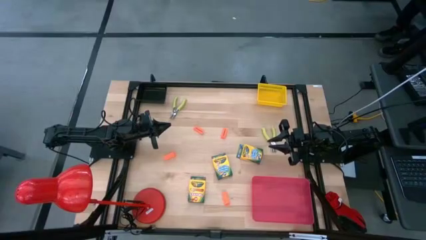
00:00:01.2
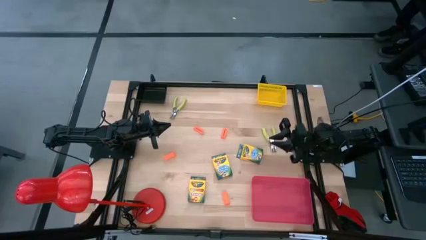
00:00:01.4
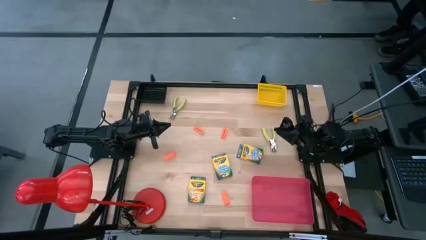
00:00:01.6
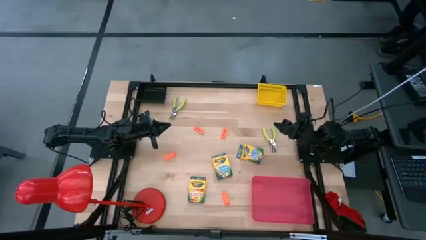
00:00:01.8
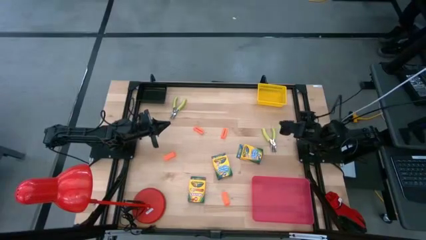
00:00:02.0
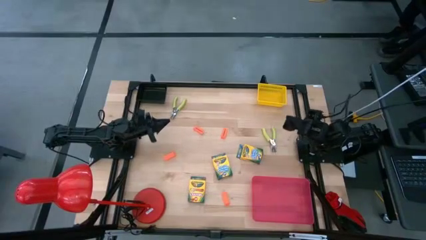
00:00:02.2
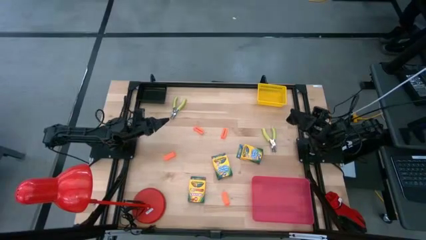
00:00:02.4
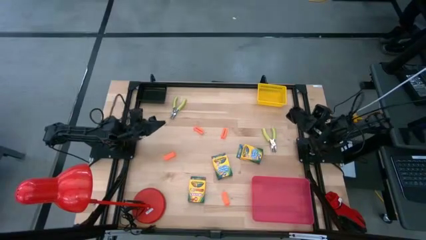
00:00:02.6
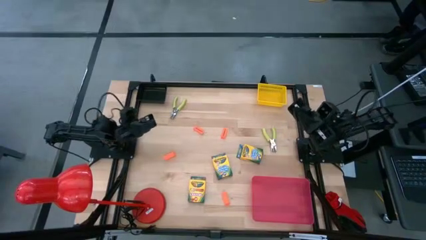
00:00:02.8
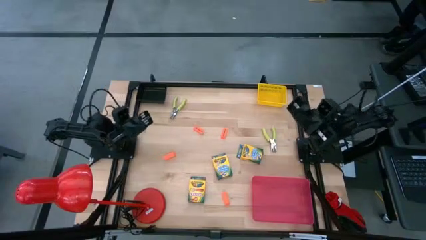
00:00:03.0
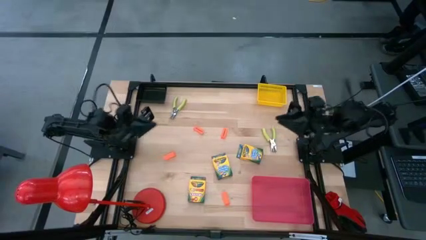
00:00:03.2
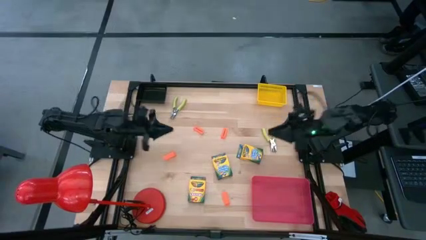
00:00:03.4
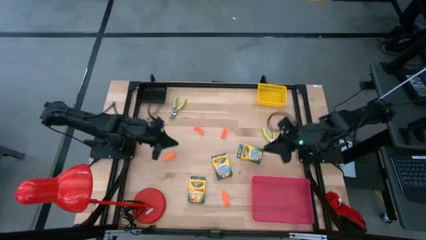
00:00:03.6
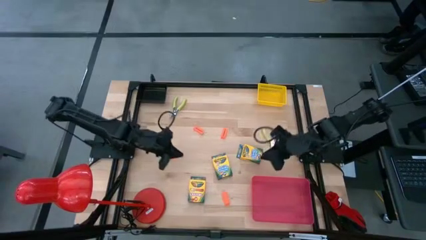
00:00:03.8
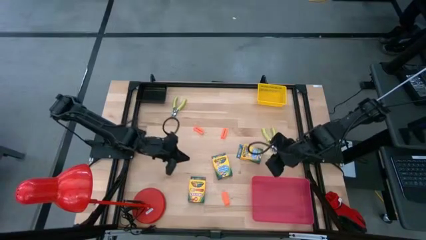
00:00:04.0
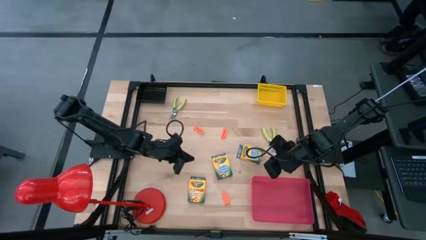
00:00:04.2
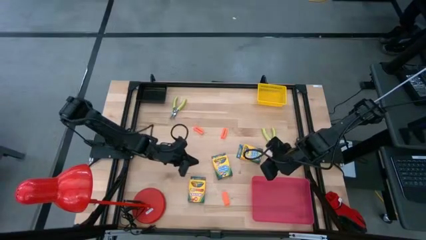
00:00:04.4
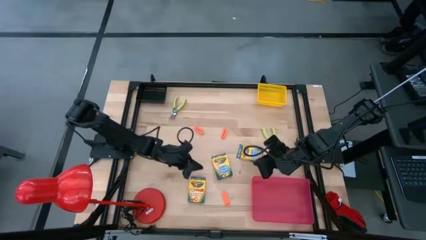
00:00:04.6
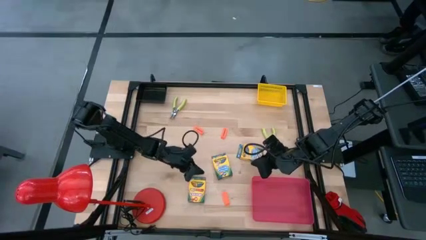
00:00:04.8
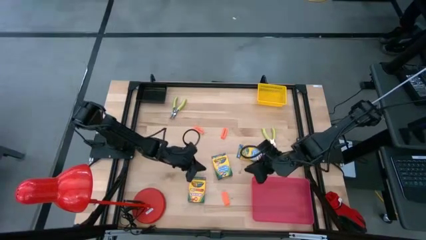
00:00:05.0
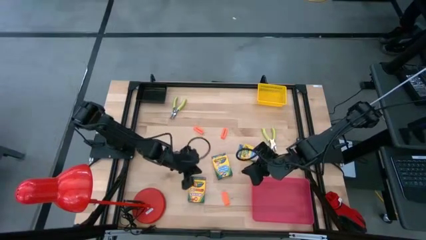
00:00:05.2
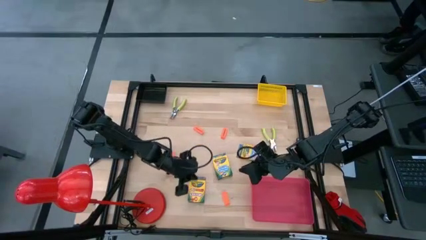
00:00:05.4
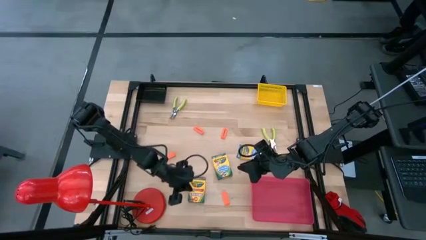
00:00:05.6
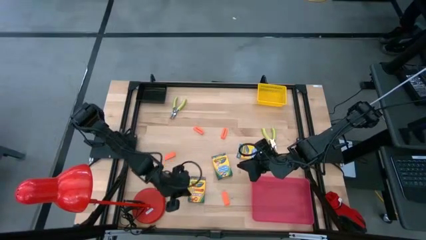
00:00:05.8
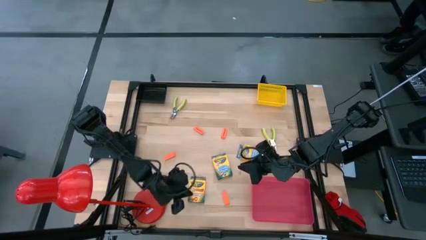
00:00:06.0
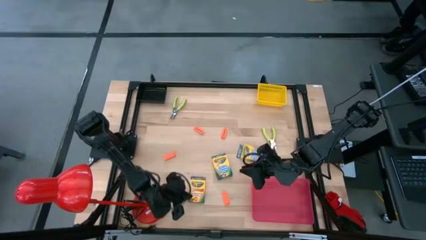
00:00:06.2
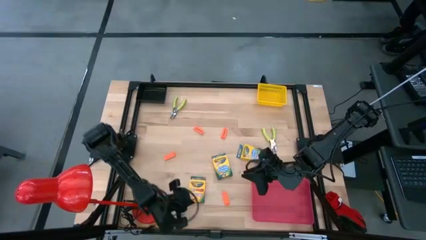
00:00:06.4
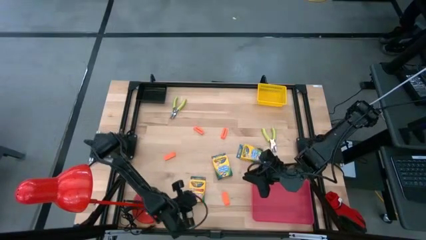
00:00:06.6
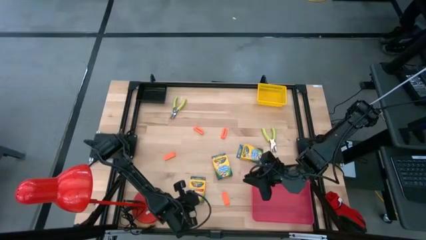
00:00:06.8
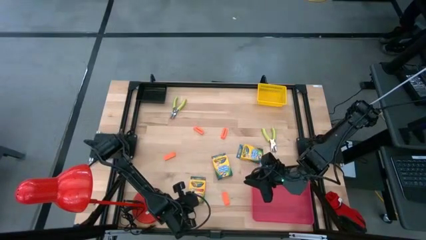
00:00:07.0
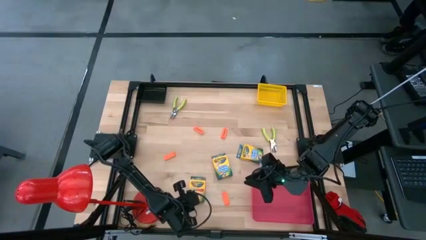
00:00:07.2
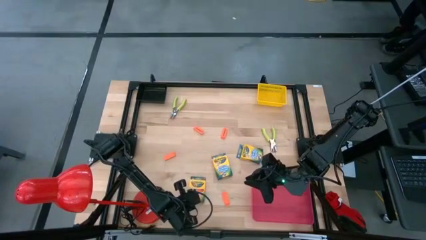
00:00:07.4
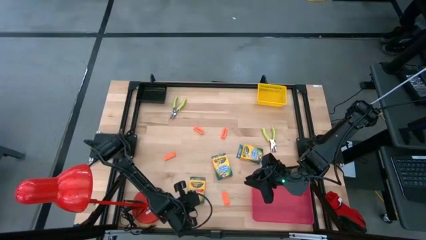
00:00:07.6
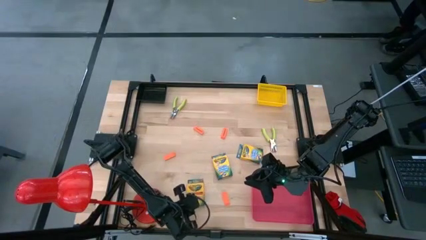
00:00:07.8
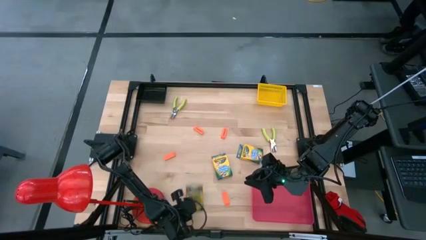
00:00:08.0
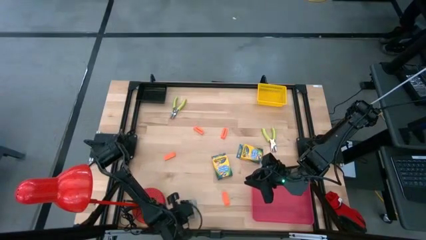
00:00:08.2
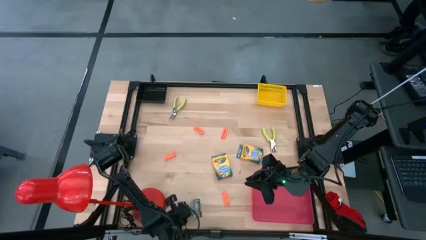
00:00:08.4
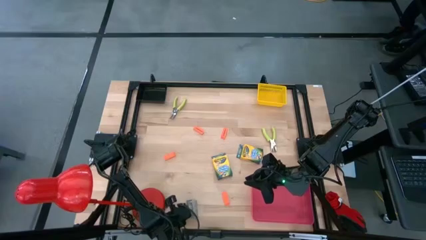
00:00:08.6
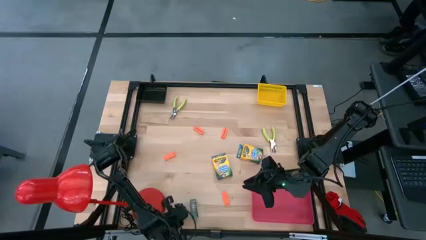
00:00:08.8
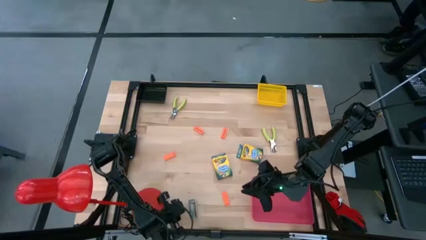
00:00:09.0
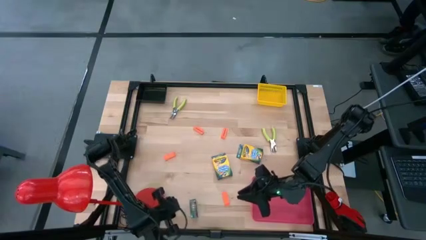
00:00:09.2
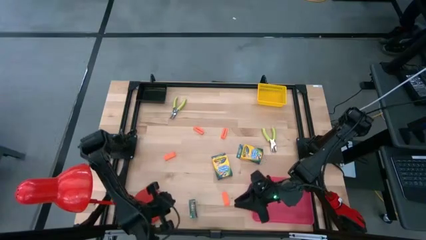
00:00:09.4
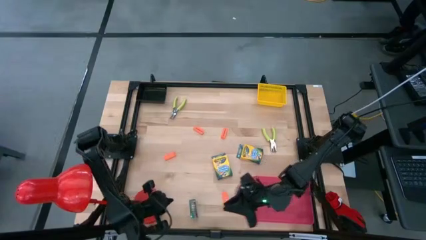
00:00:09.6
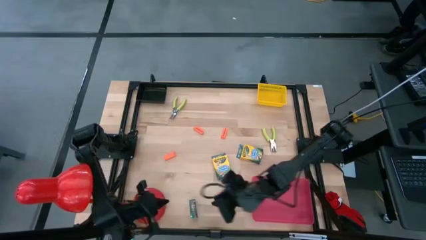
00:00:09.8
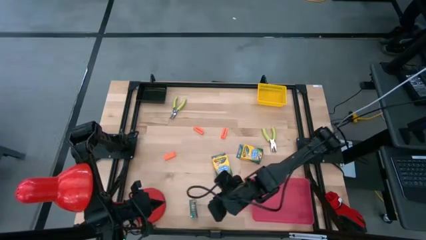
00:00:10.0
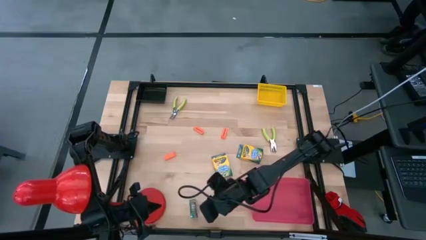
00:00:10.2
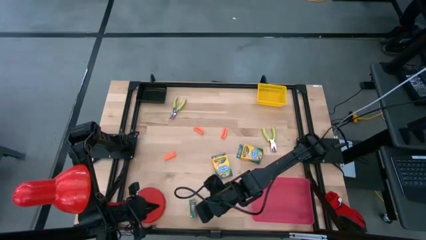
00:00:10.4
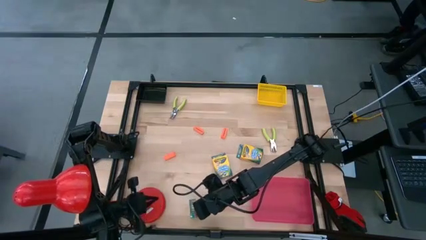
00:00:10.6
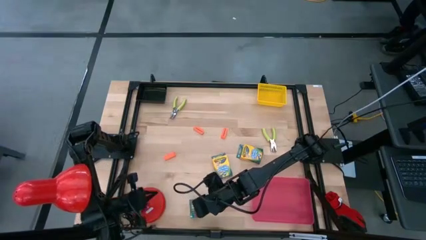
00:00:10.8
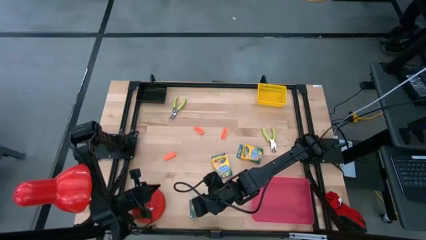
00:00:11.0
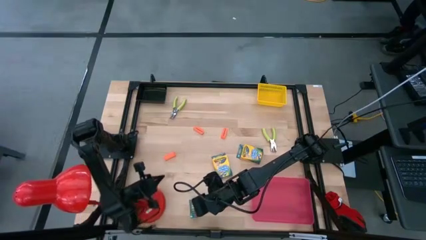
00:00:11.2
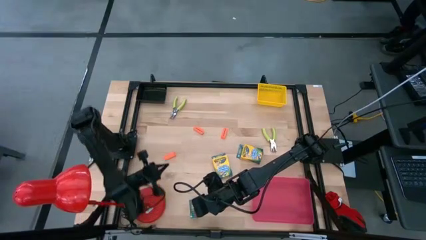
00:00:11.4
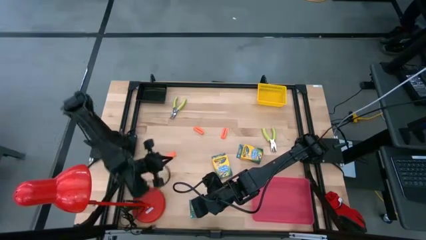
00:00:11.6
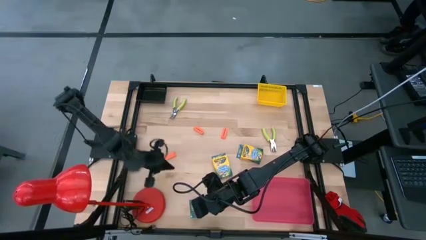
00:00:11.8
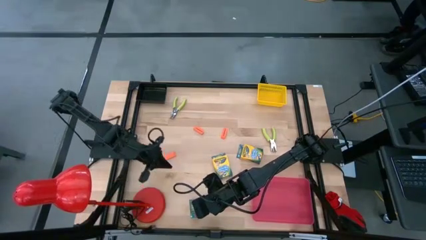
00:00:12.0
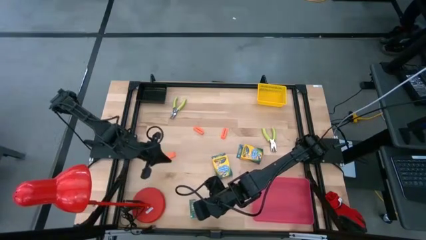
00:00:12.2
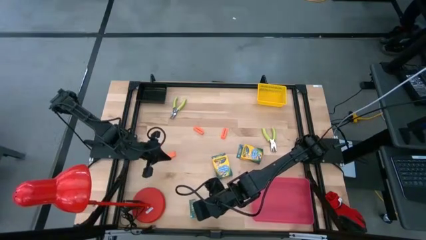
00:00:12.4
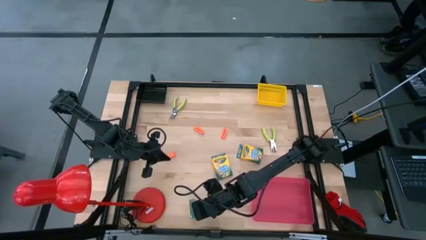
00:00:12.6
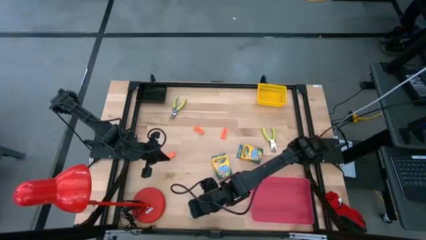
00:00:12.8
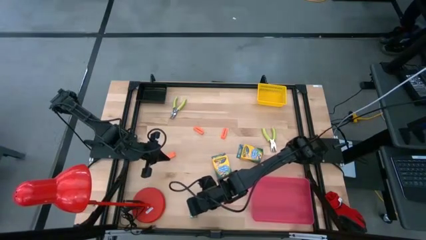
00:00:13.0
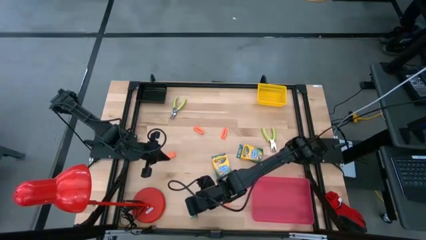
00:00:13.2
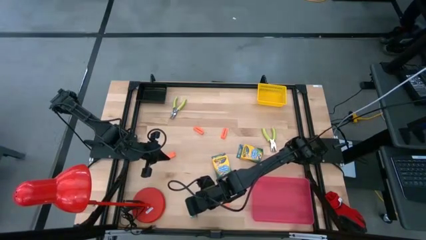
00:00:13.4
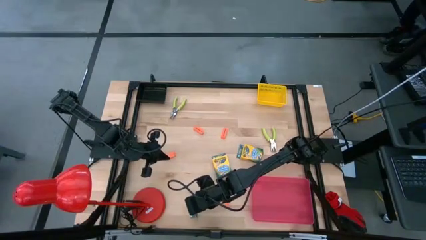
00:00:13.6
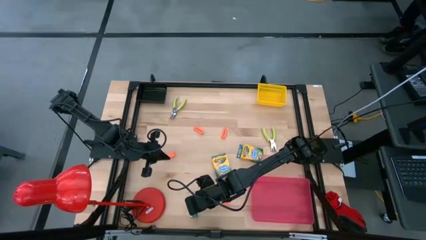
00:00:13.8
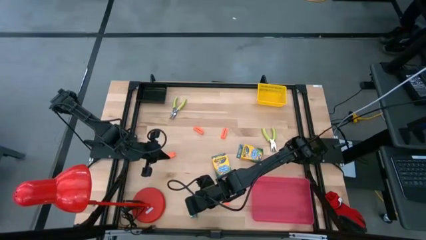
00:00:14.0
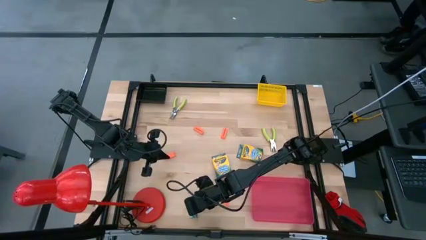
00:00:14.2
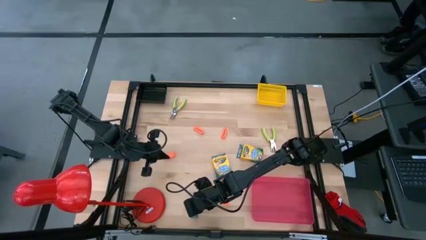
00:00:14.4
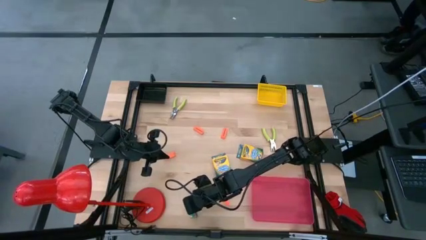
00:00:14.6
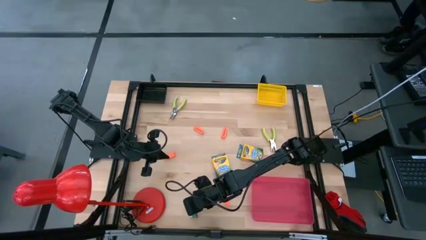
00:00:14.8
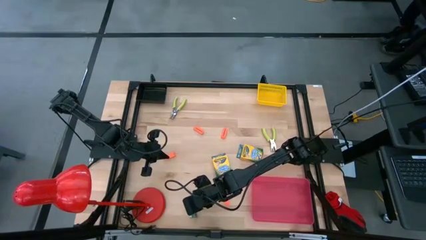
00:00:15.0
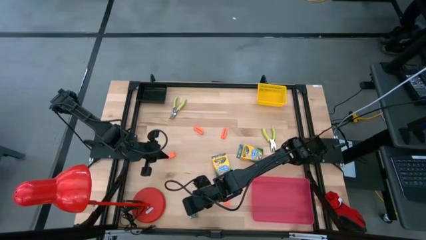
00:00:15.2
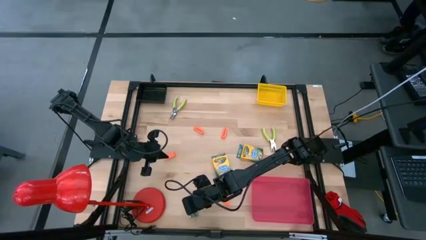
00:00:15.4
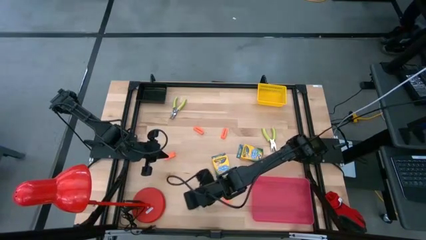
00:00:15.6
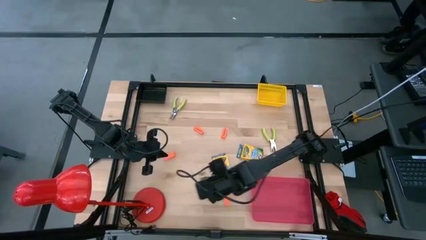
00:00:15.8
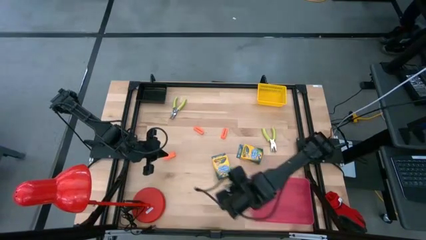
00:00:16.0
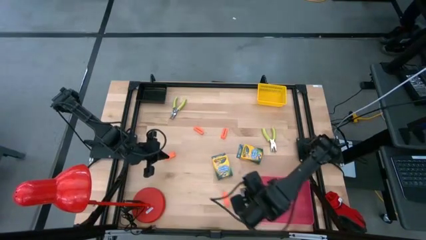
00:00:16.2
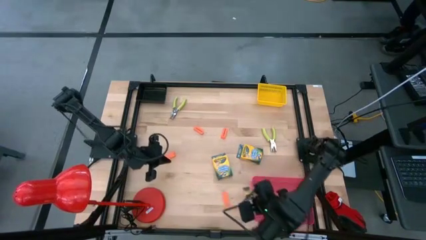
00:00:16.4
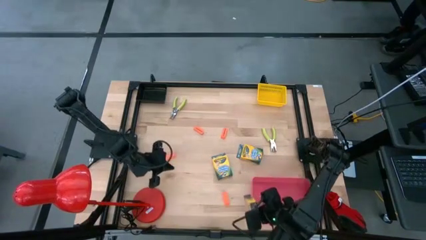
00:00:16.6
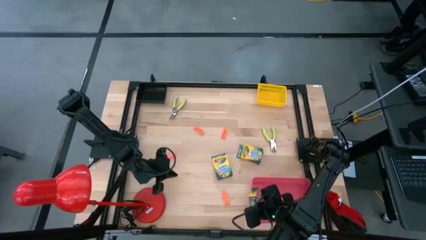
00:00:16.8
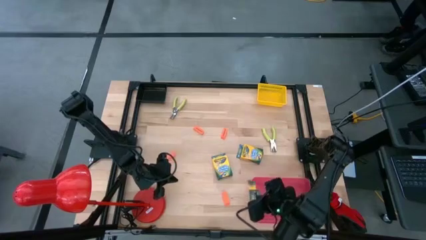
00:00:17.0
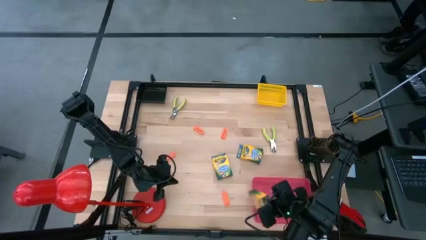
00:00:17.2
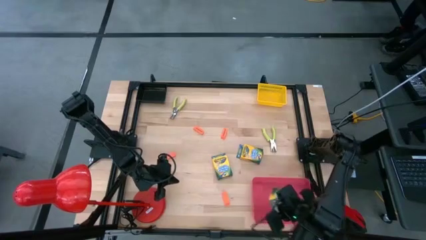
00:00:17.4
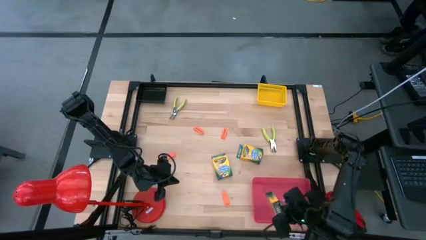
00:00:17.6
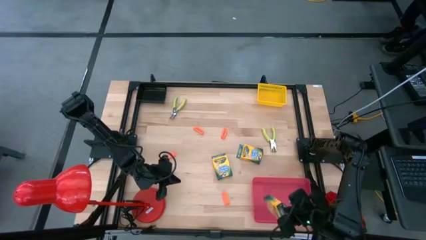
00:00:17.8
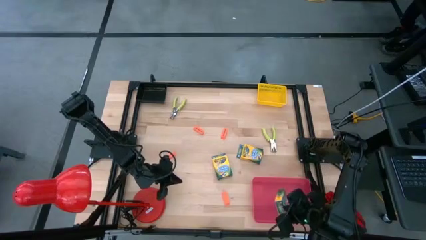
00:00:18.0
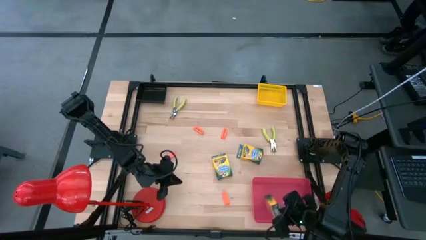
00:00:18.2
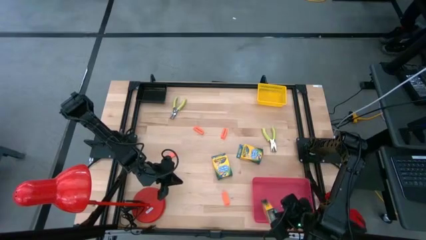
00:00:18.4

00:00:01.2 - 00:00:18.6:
Task: Pick & Place School Supplies
Put the crayon box into the pink bin
